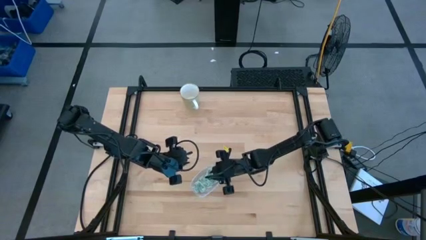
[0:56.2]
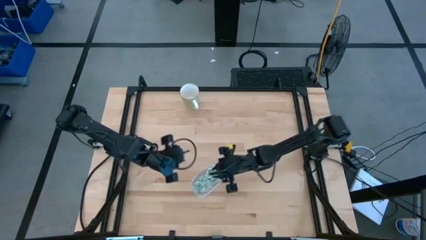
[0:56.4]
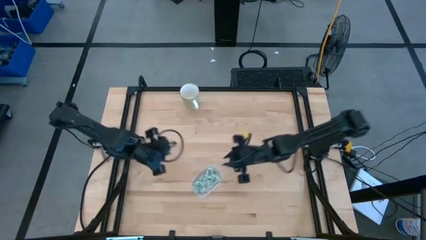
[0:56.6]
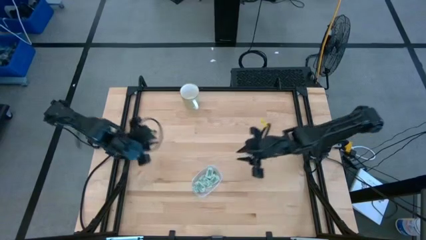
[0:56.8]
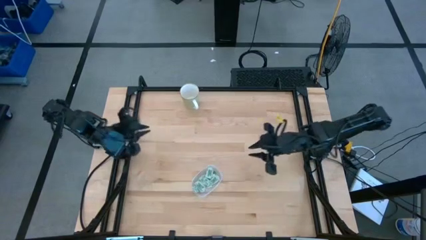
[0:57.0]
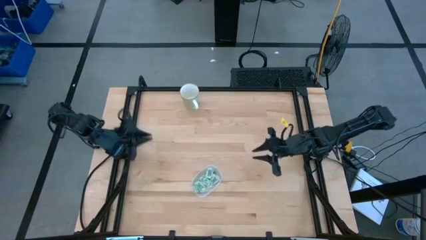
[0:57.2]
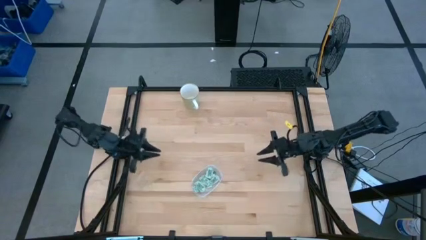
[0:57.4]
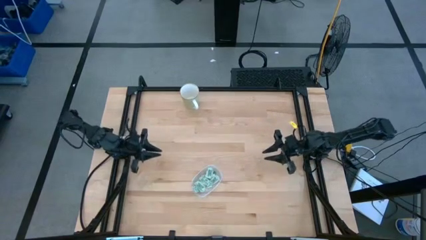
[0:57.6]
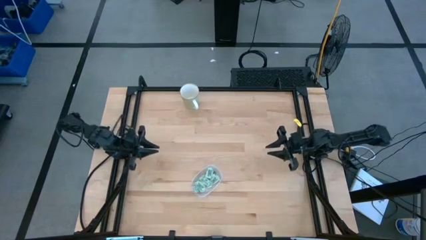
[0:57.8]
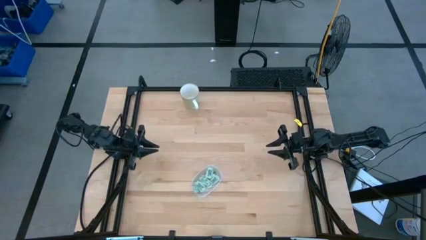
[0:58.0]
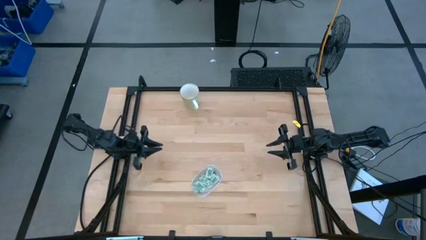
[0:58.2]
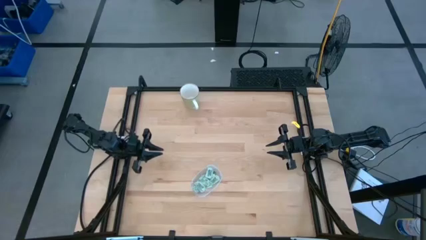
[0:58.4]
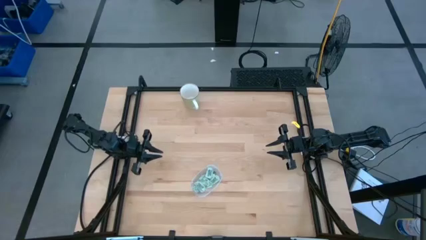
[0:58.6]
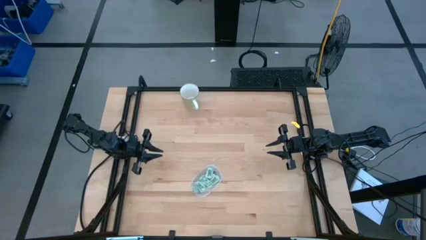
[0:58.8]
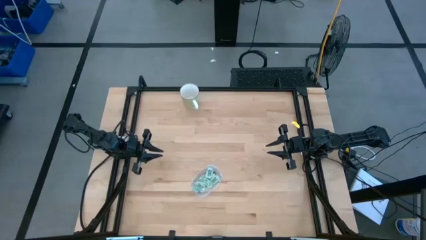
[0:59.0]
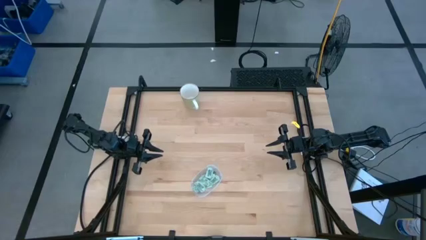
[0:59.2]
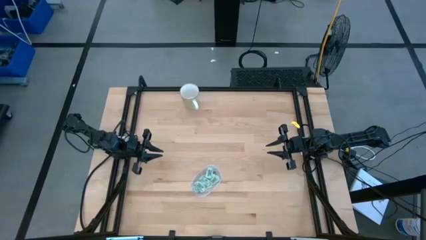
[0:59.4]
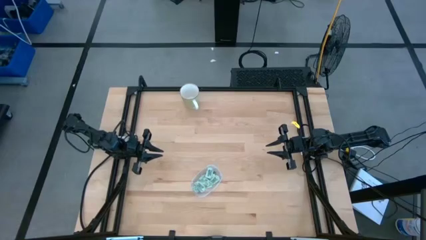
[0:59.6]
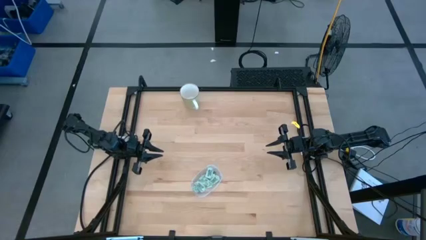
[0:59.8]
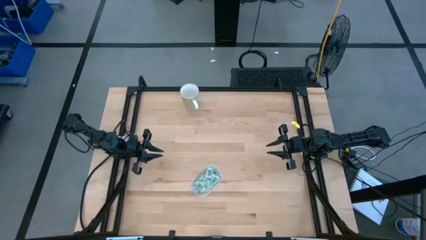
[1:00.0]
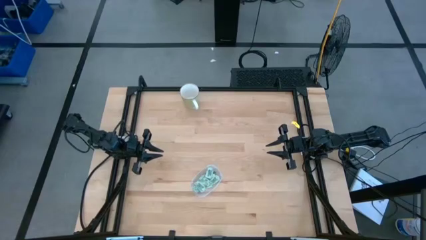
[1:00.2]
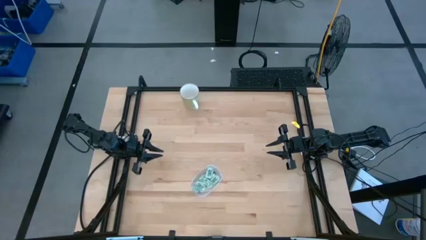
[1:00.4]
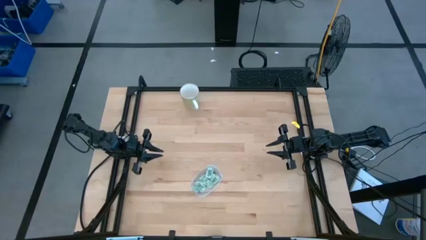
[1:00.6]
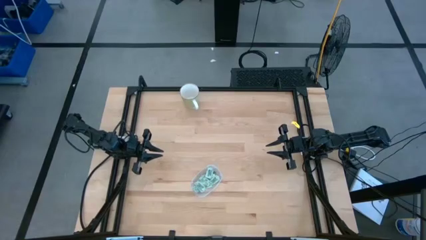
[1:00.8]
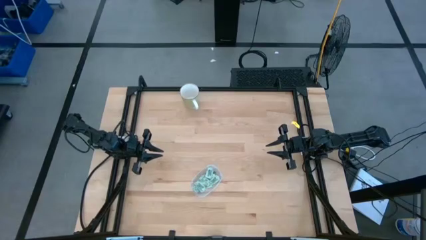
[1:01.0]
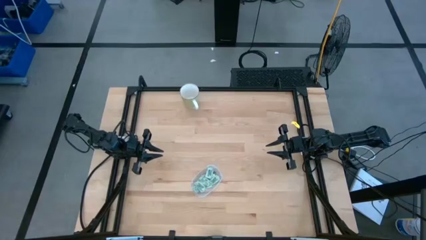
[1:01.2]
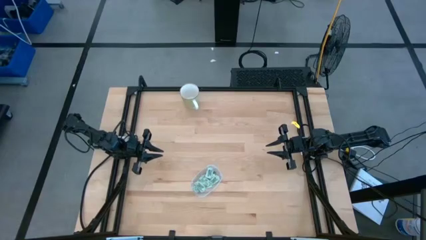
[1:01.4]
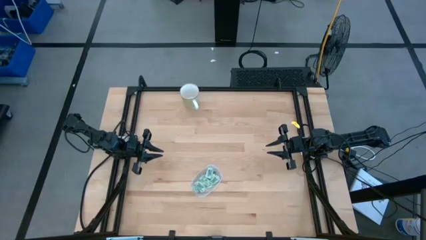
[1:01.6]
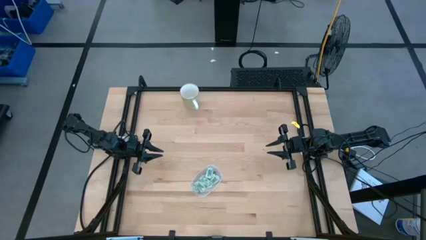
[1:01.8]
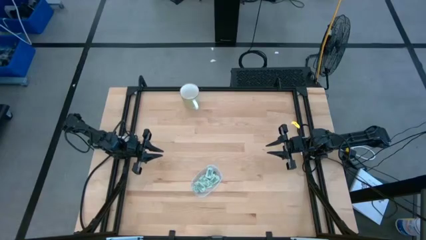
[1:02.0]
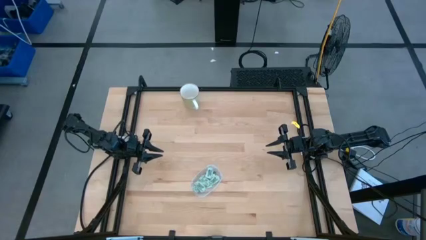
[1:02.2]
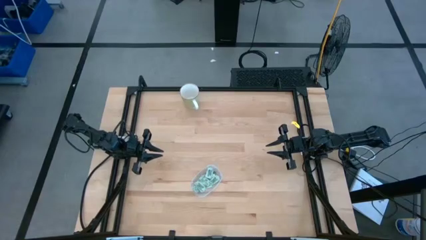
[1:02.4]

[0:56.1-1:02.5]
Task: Pick and place Stevia / Truvia into bins
Return to home Position

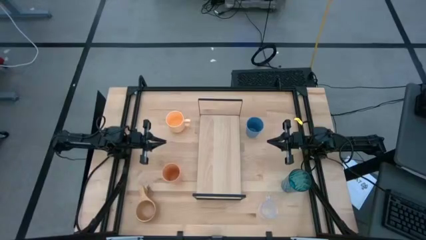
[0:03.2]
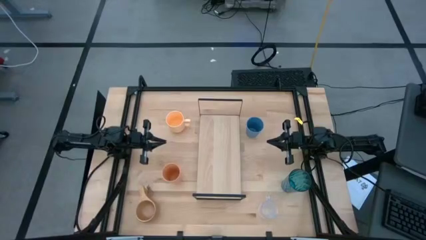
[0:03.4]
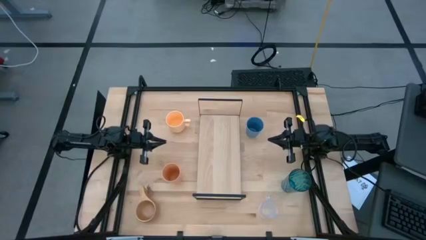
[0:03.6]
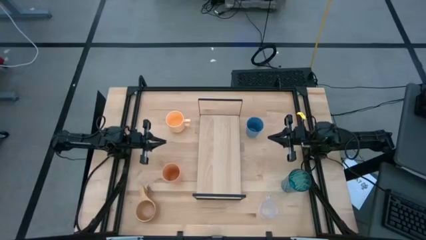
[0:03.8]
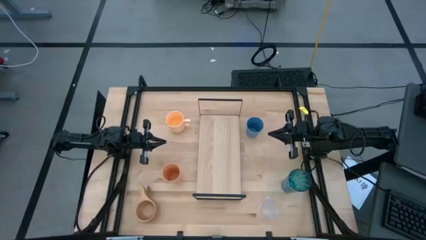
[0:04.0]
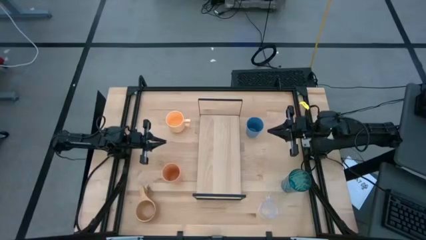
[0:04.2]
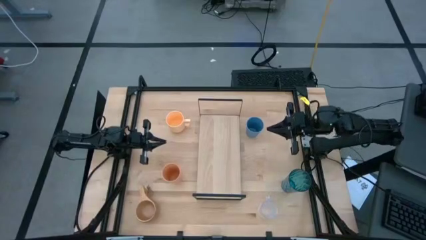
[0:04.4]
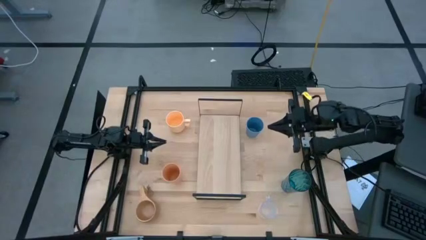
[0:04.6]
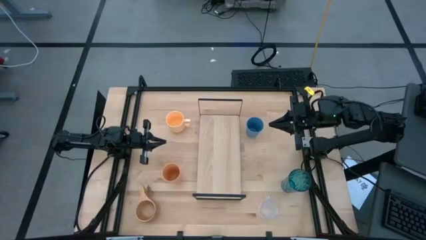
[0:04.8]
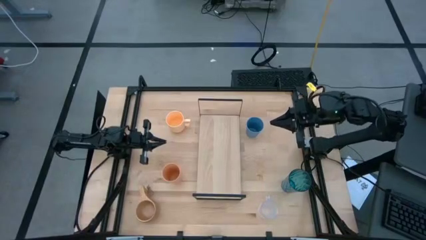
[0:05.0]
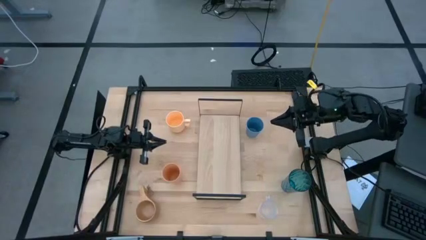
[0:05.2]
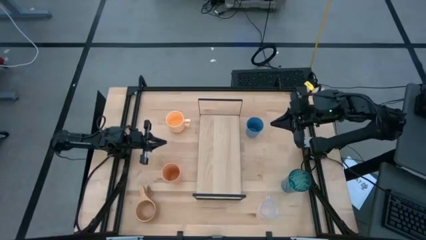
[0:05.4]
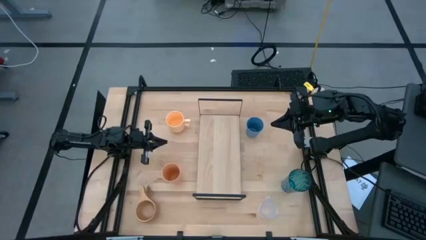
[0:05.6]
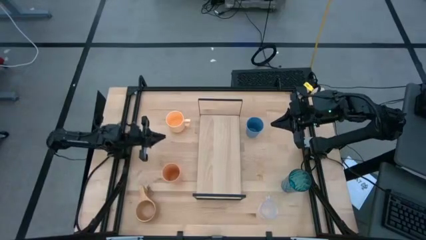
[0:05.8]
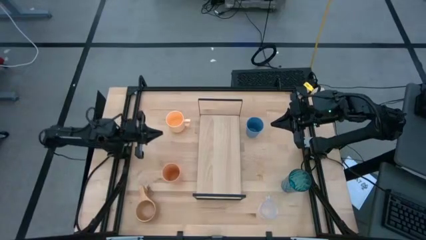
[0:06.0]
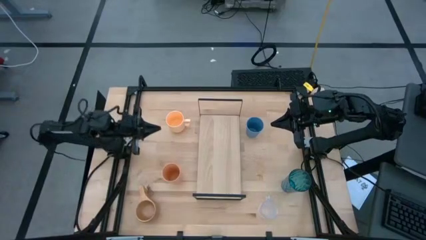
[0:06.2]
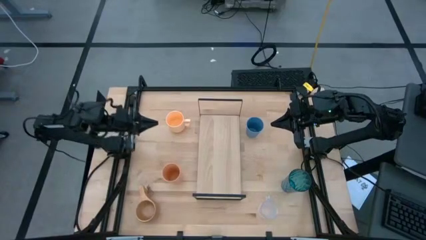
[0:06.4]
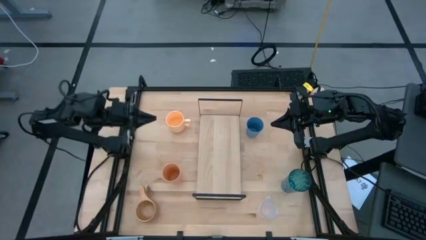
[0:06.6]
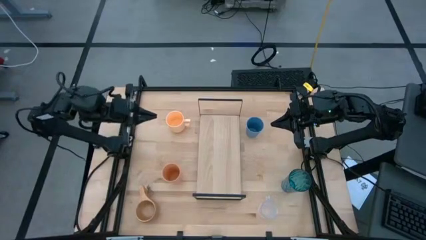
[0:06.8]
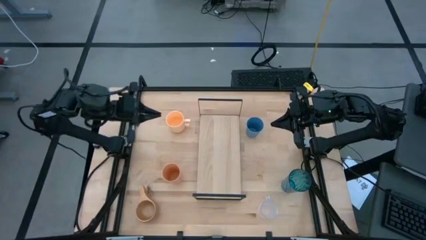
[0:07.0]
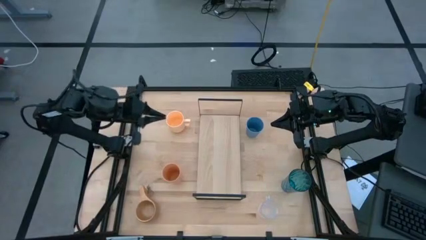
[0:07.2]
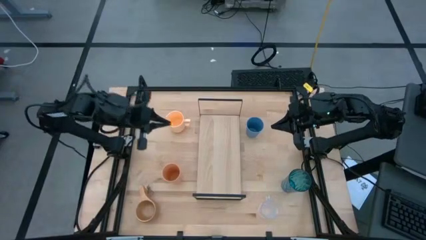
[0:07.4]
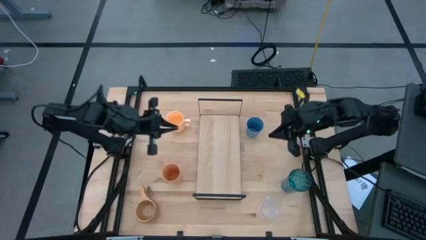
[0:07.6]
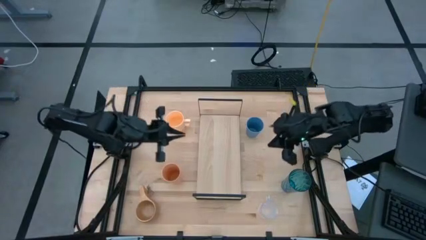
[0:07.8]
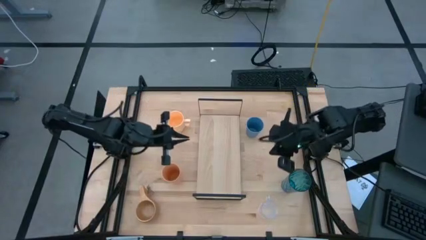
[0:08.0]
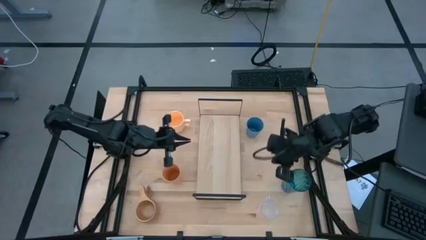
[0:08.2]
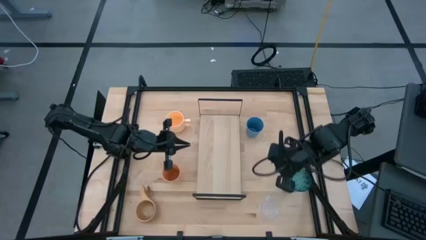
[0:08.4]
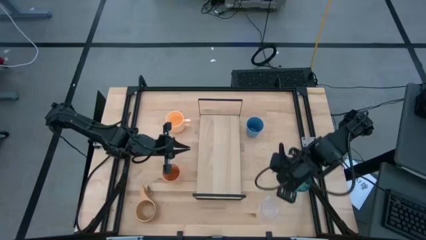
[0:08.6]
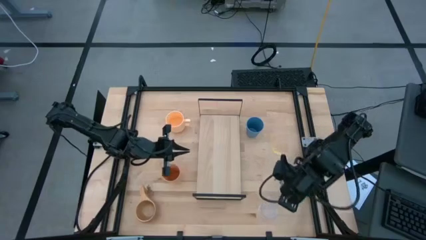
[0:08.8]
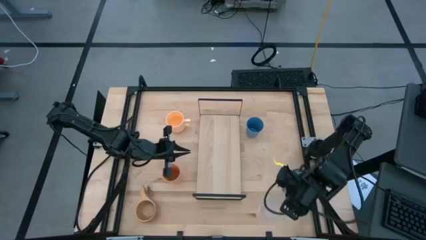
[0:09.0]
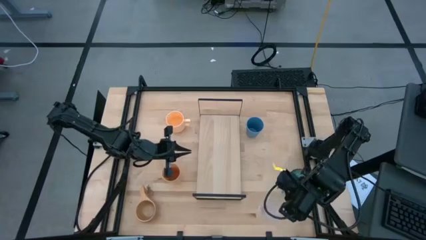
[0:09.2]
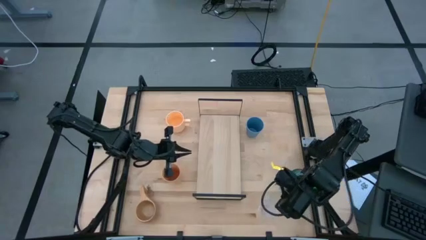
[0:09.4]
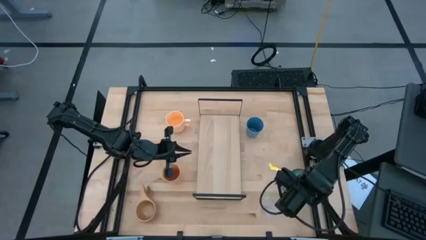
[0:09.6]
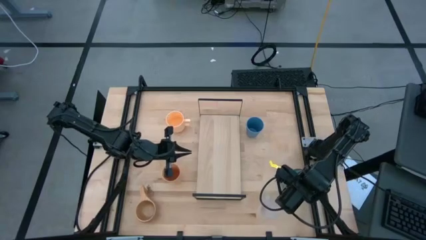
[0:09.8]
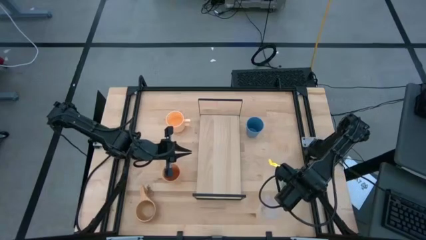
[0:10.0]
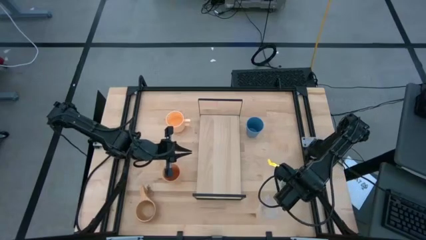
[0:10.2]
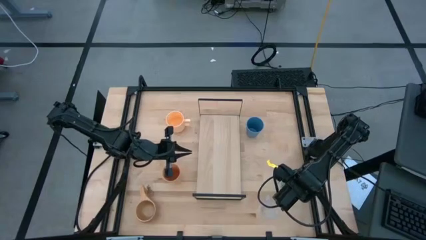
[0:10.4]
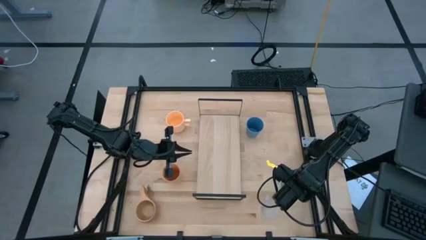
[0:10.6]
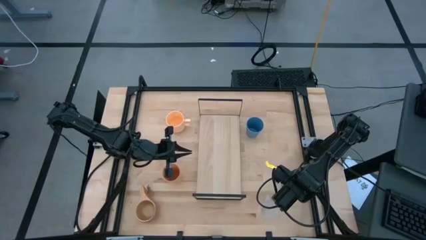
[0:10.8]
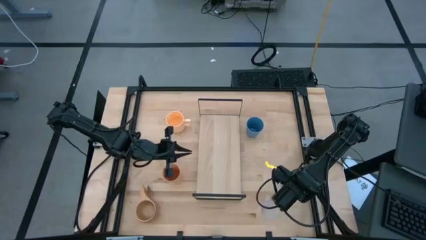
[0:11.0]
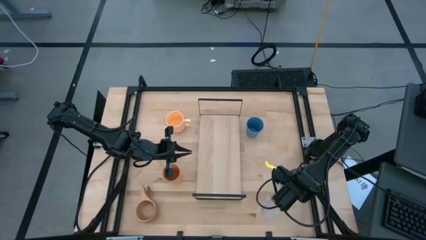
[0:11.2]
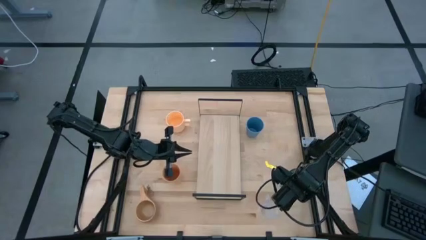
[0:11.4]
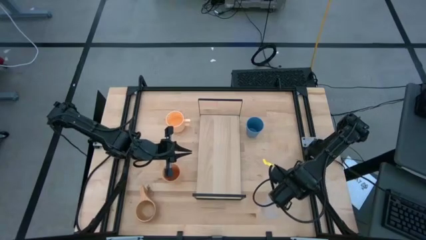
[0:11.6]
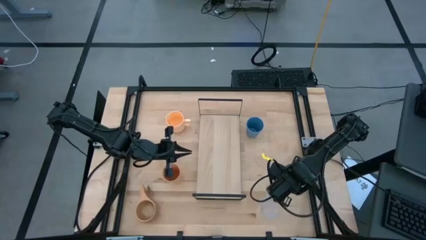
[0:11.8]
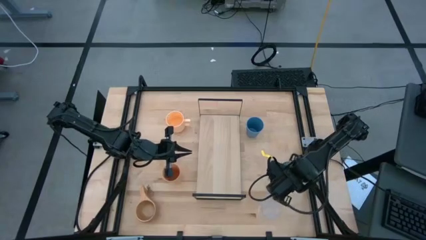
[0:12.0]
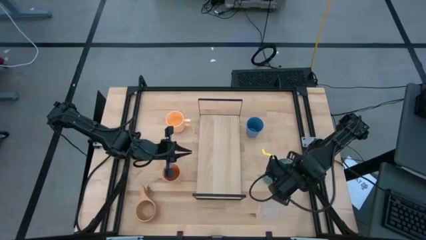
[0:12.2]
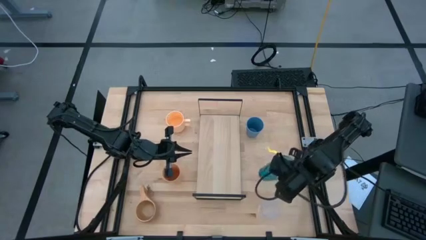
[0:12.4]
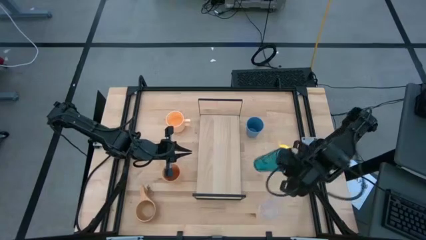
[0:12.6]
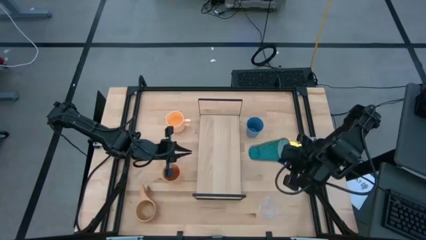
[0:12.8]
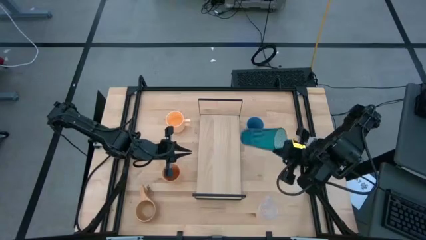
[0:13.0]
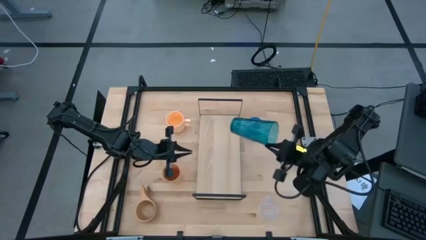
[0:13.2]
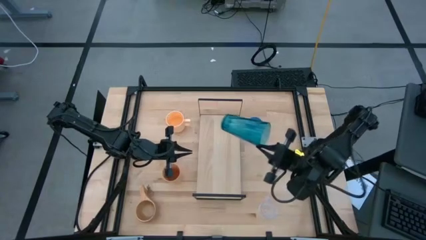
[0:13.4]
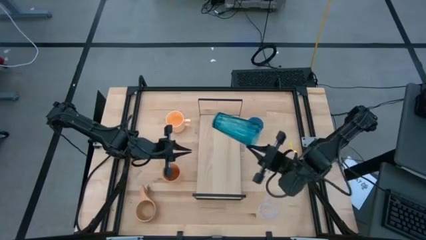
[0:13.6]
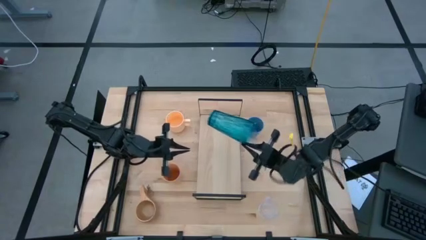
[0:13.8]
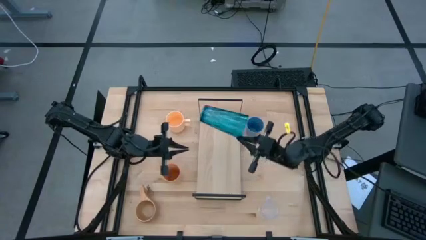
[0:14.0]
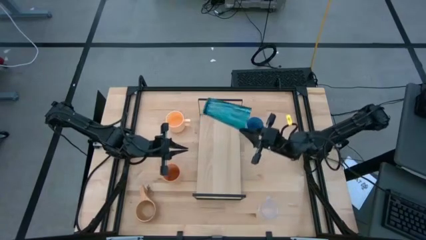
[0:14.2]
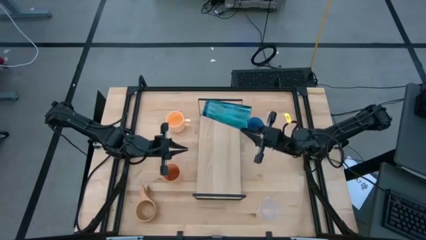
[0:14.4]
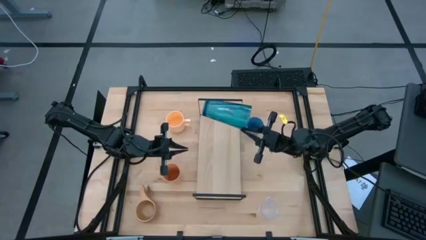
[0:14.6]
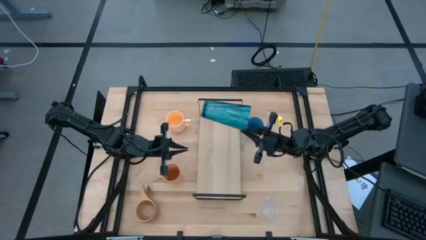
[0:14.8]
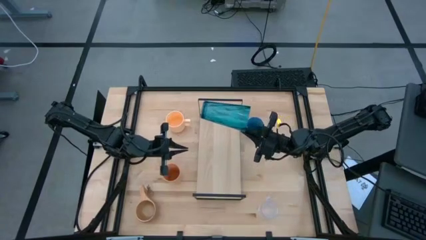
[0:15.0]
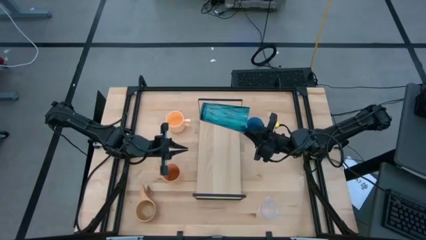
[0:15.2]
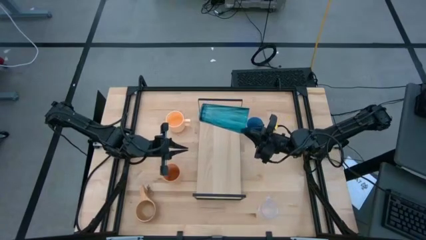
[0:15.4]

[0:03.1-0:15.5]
Task: Stack small to large cups/mugs on shelf
Put the light blue cup on the shelf
